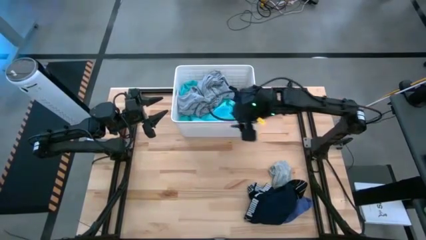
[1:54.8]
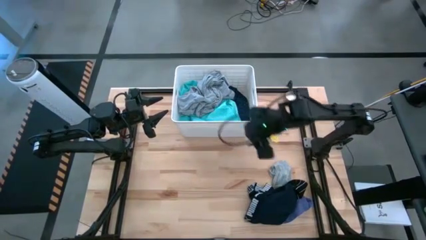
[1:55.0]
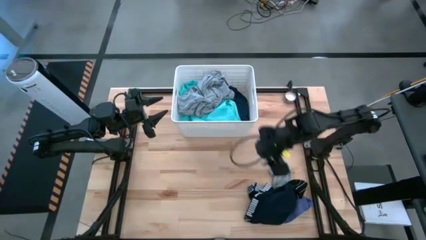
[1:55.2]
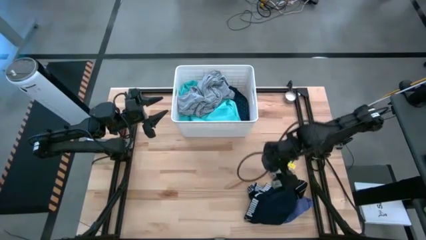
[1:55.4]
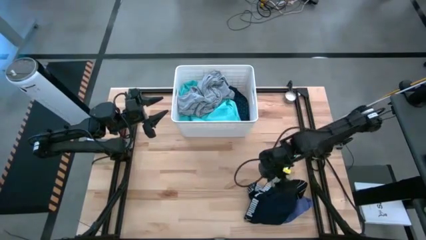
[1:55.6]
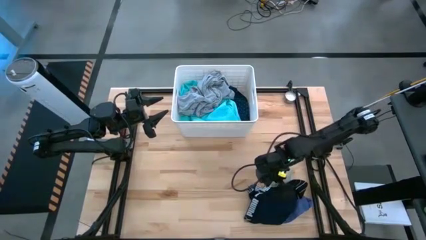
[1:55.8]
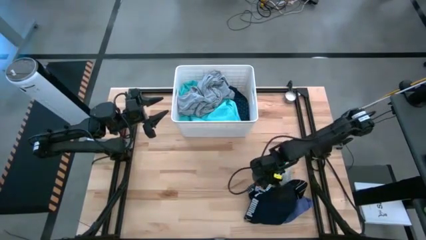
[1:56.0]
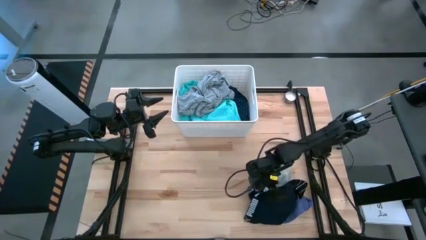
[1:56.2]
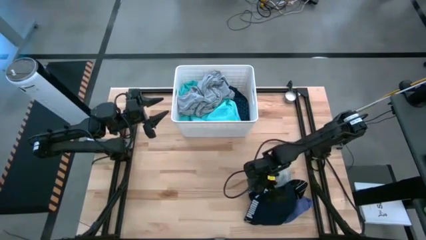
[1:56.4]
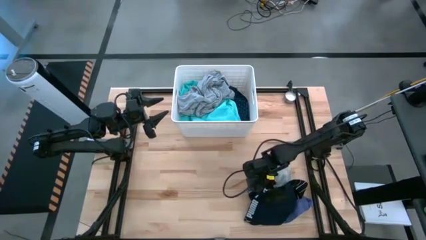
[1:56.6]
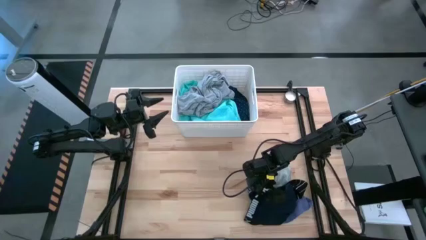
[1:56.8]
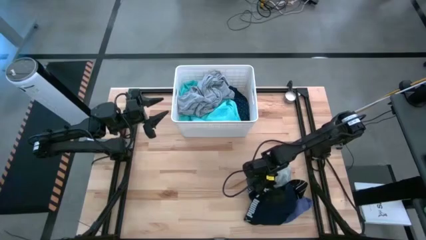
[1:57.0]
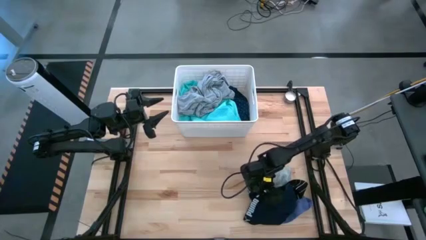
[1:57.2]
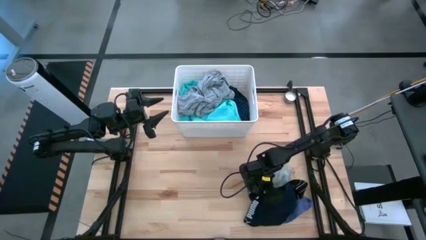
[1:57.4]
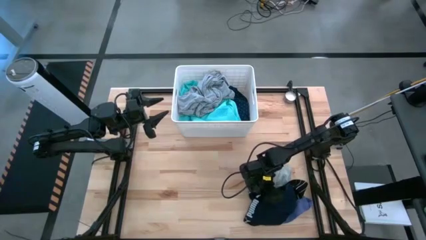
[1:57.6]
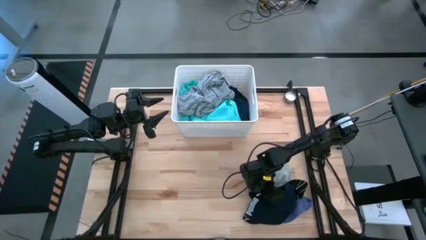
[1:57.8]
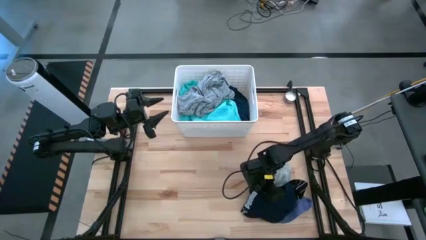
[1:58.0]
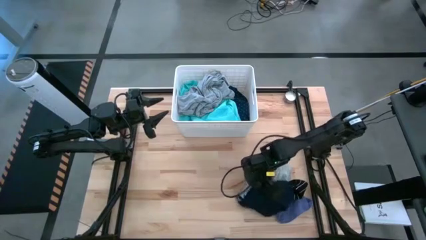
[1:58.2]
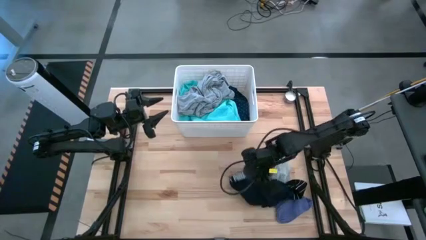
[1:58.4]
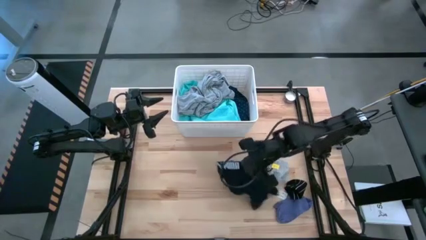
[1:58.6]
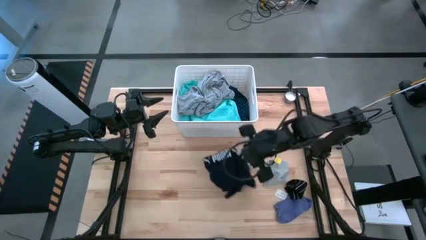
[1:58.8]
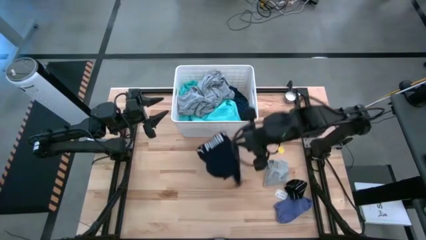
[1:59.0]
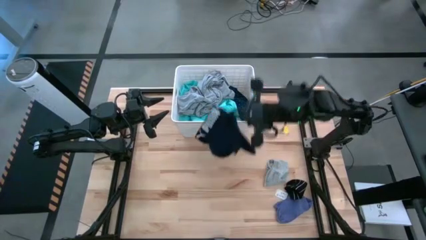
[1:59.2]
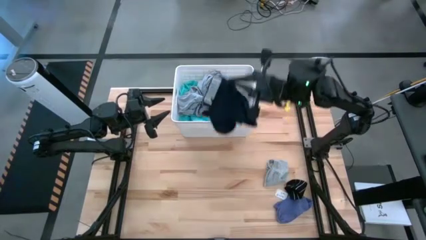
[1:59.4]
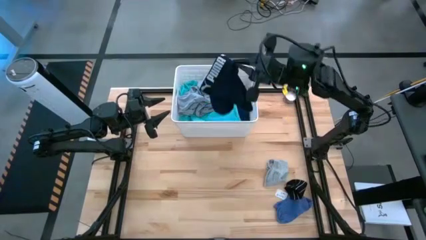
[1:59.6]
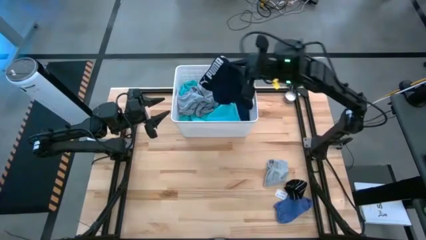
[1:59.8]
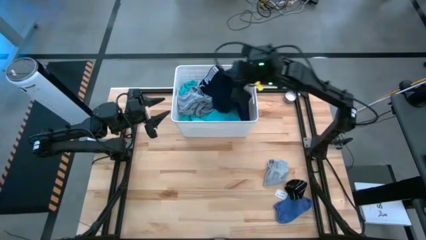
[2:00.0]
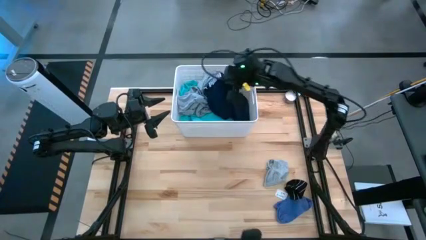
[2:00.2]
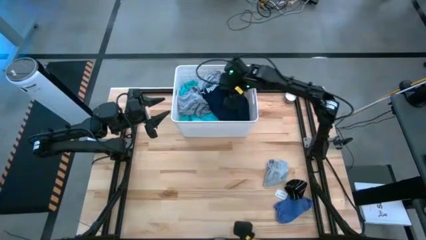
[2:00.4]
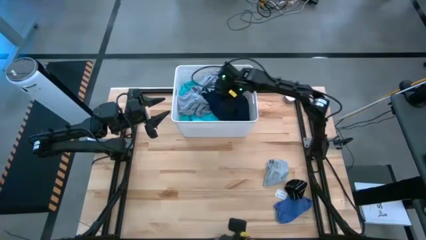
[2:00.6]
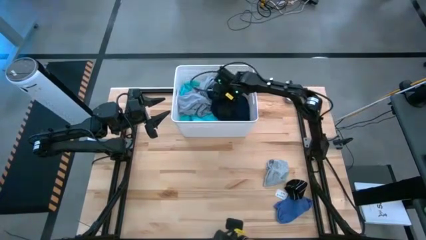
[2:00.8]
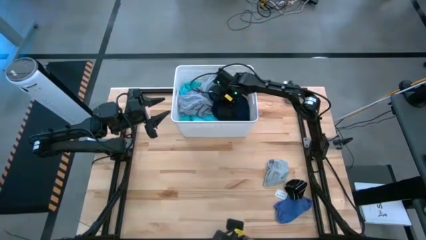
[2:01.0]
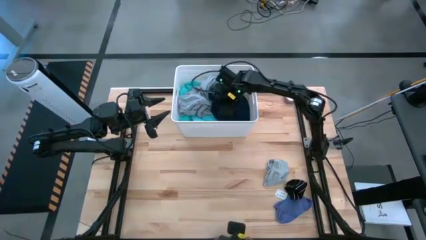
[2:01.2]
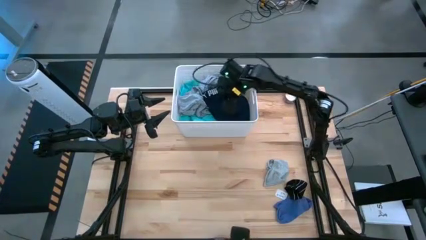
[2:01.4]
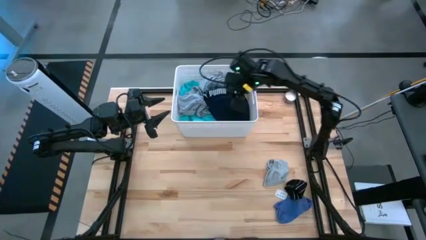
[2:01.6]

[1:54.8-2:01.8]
Task: Sort clothes
Put the dark blue boxer into the white laundry bin

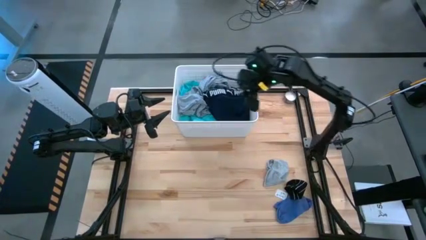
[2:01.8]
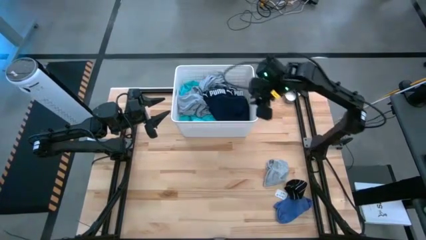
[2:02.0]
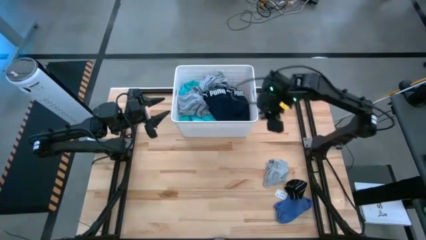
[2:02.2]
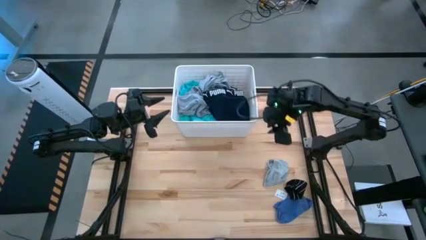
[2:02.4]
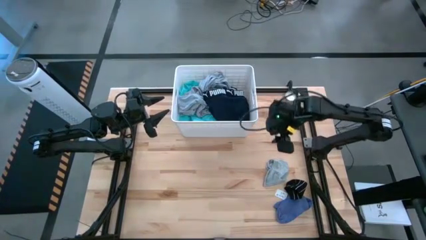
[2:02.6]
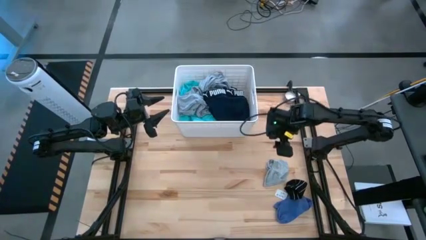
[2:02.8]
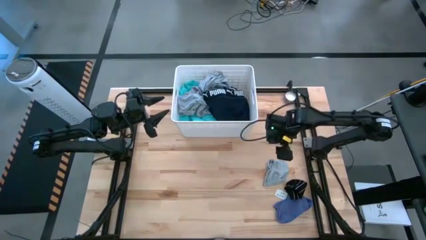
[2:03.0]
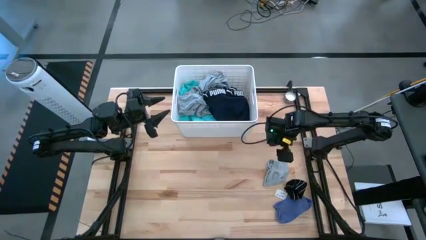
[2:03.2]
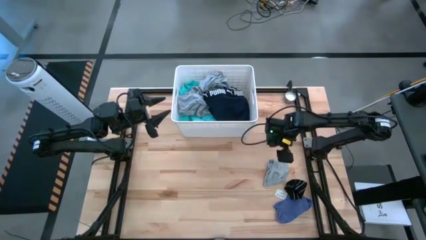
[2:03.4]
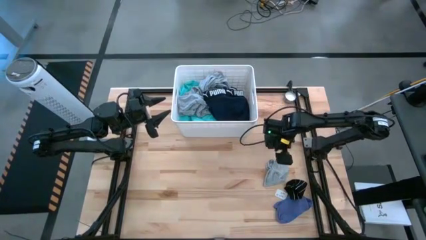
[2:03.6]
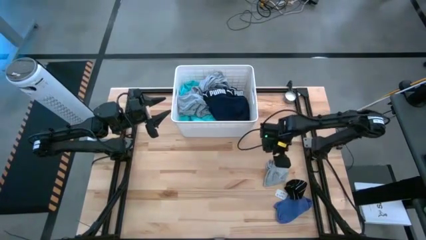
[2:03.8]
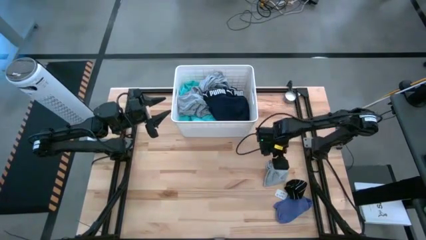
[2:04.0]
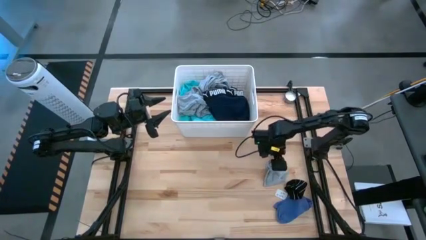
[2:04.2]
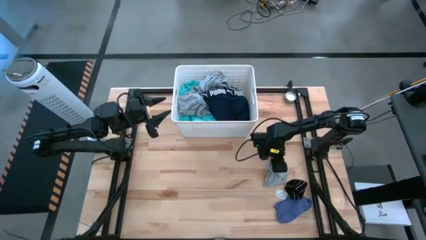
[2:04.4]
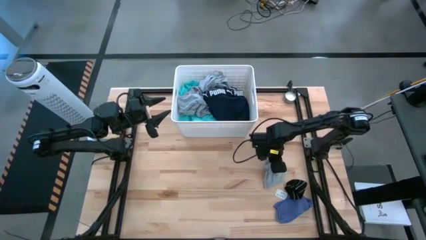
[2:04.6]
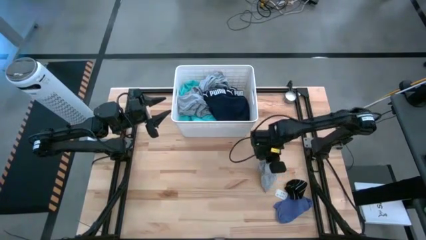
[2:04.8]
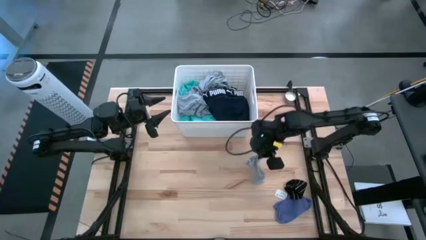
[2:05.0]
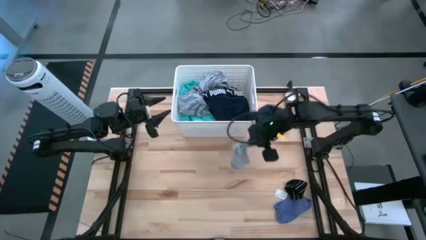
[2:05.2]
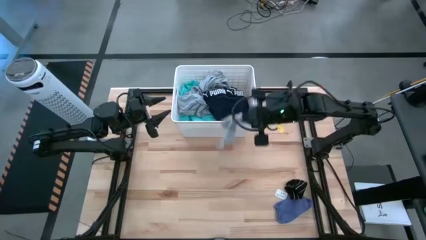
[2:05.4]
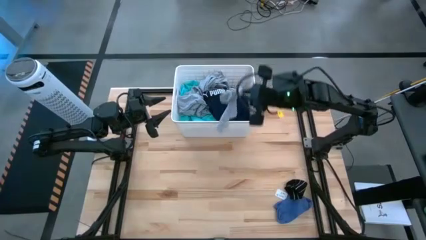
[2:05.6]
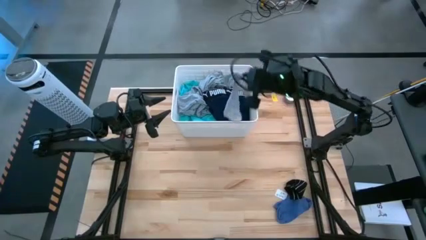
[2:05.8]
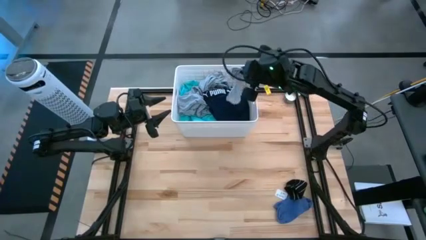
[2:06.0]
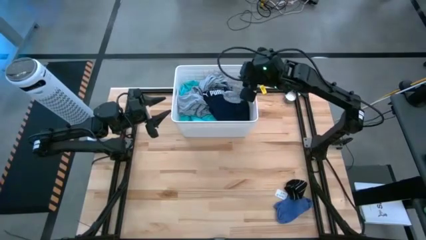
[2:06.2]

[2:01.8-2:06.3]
Put the gray sock into the white laundry bin

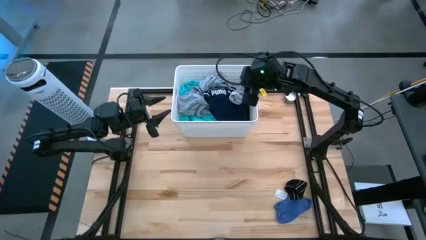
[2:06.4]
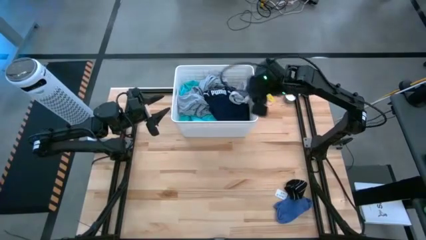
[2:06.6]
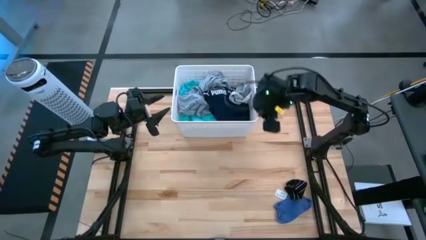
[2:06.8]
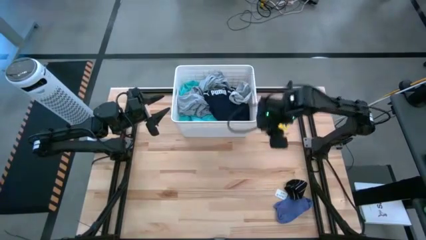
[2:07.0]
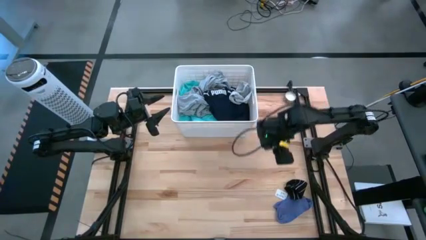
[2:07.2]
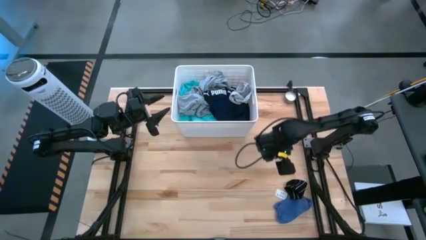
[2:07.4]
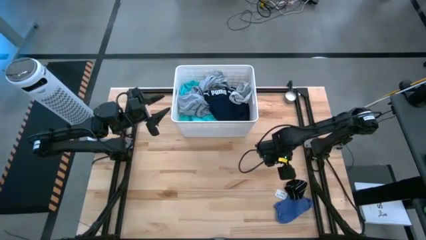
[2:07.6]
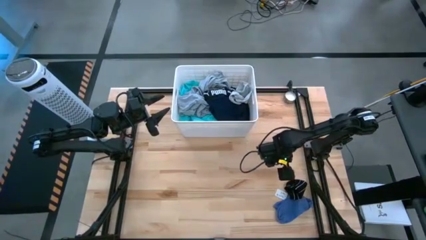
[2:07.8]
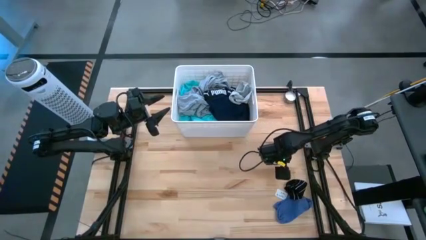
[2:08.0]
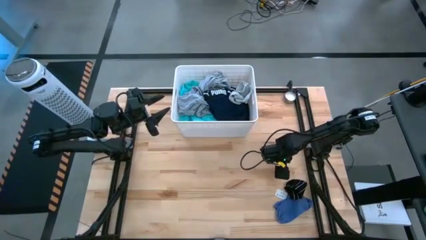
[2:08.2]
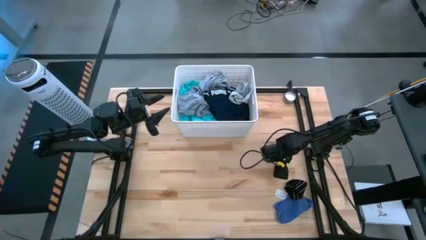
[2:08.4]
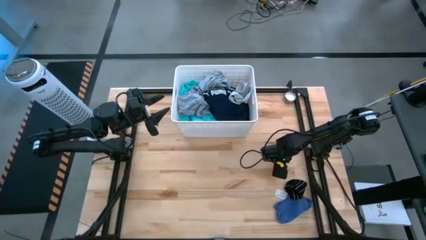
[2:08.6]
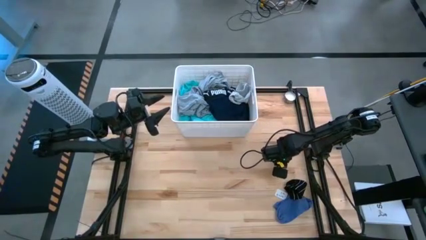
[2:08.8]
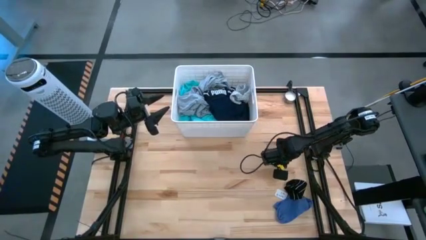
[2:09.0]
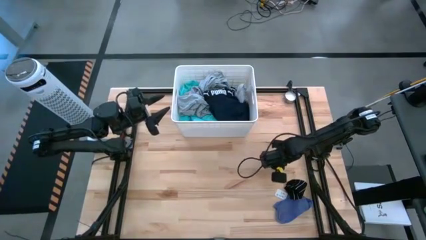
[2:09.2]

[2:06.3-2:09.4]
Put the black sock into the white laundry bin

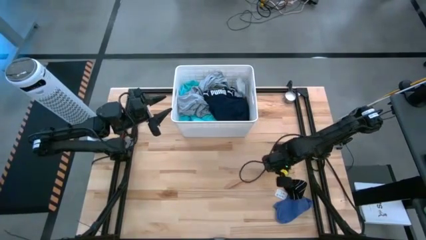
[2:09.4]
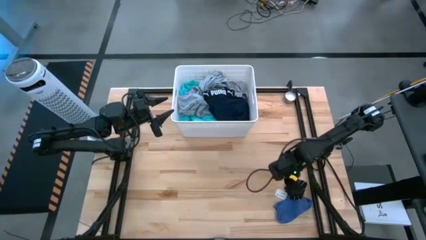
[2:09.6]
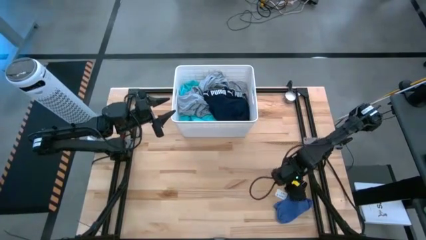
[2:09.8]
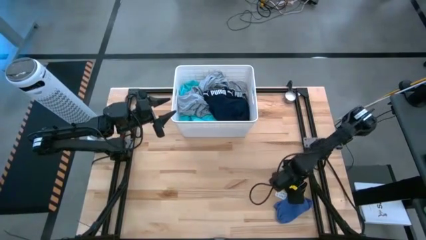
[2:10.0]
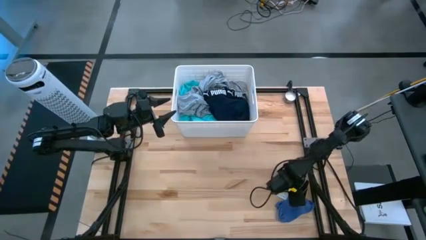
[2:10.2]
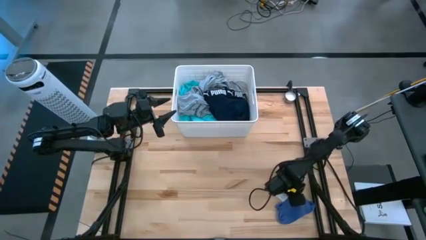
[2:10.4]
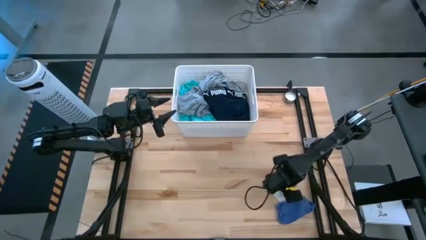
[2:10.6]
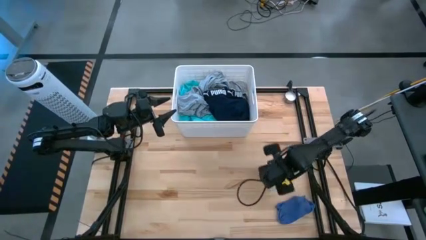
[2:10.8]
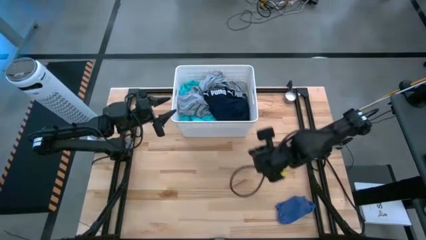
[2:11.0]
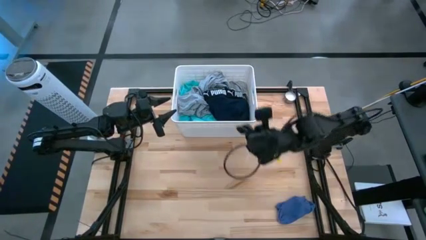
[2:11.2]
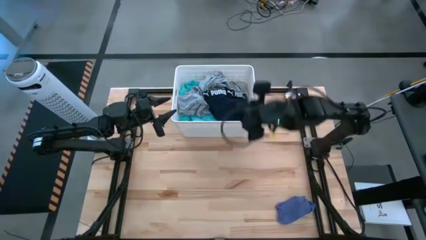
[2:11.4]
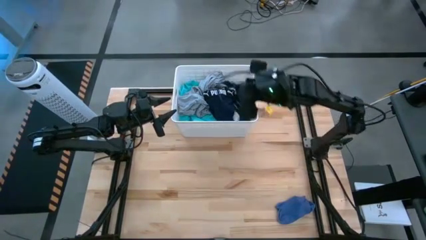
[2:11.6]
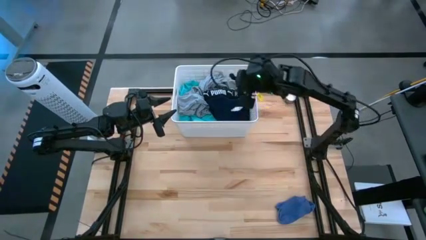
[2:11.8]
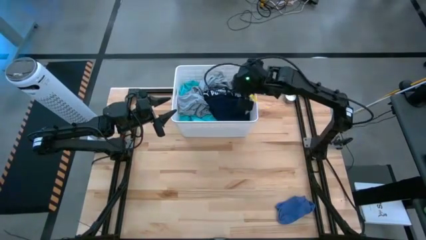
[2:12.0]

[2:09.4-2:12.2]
Put the black sock into the white laundry bin
